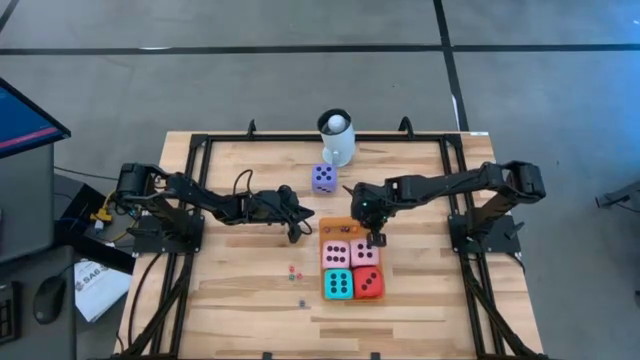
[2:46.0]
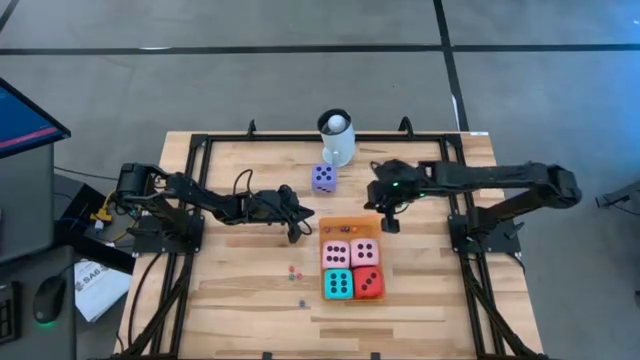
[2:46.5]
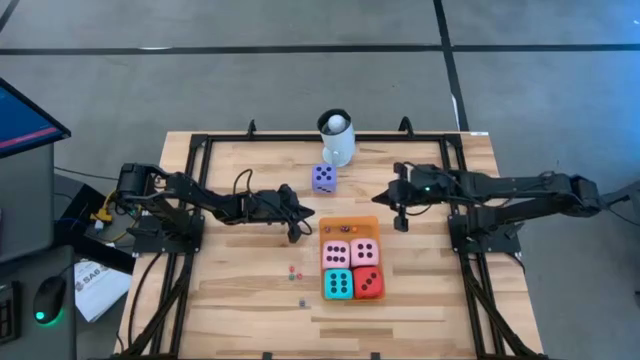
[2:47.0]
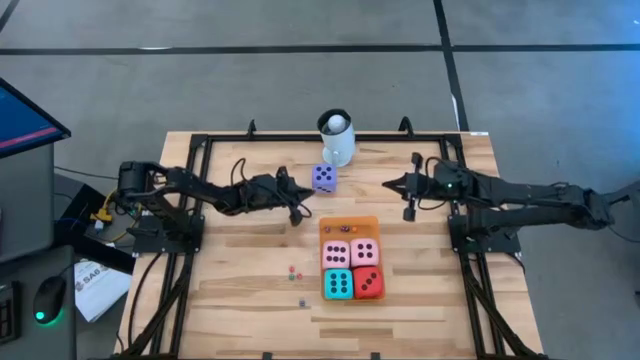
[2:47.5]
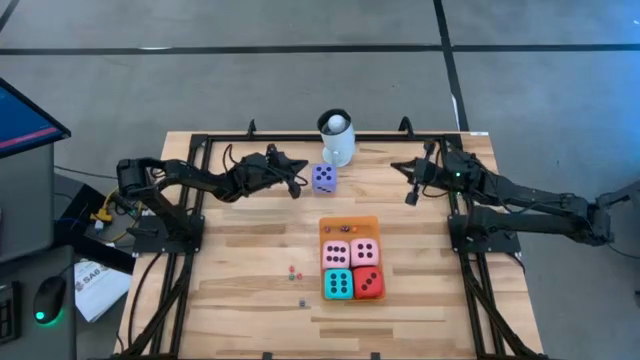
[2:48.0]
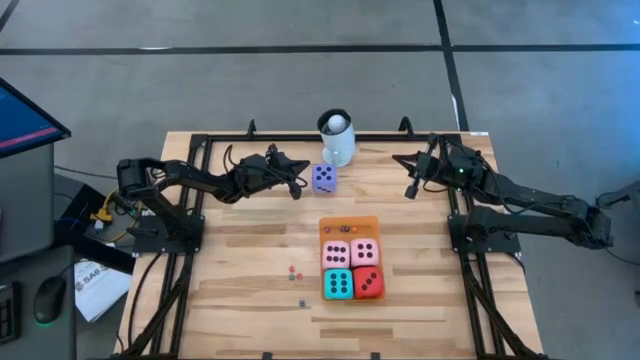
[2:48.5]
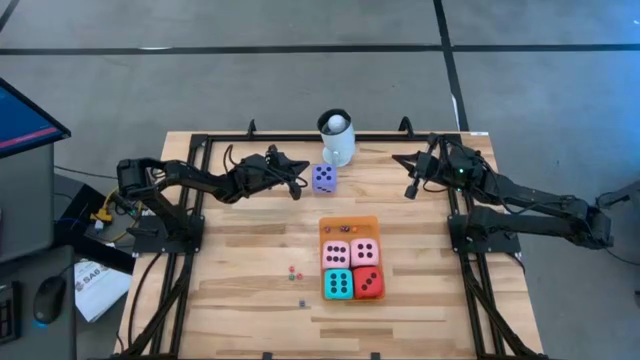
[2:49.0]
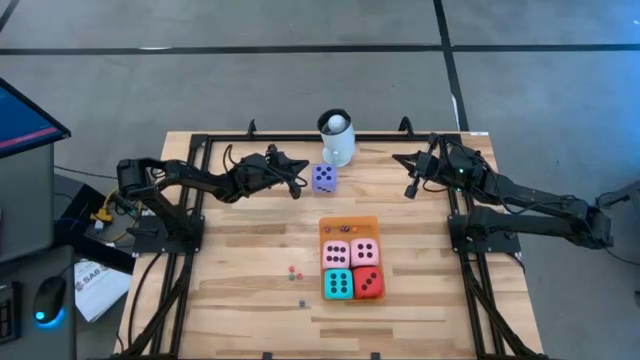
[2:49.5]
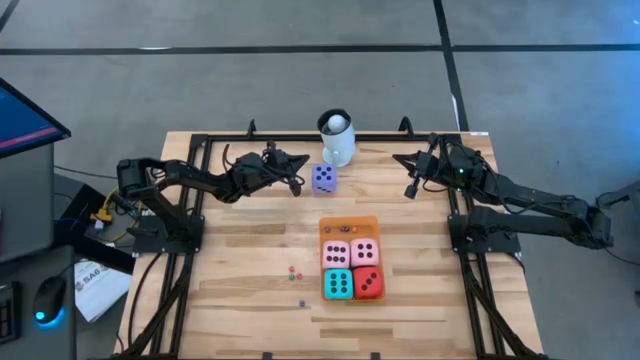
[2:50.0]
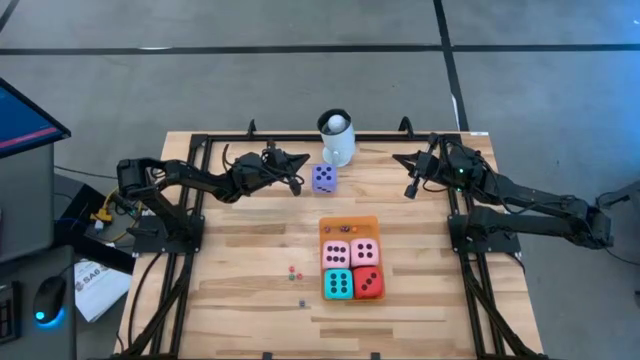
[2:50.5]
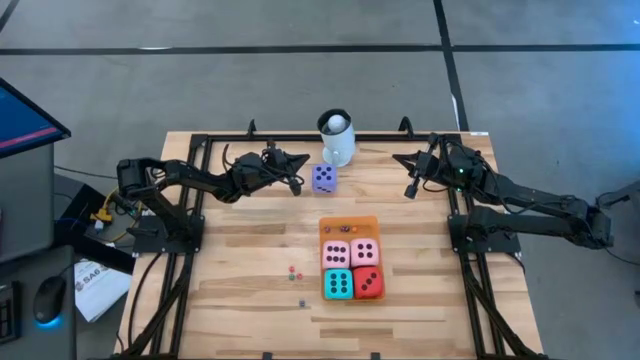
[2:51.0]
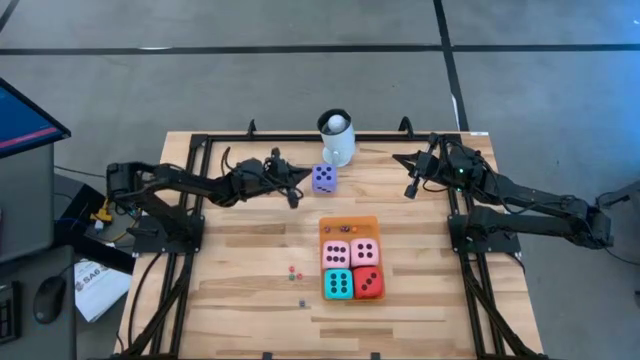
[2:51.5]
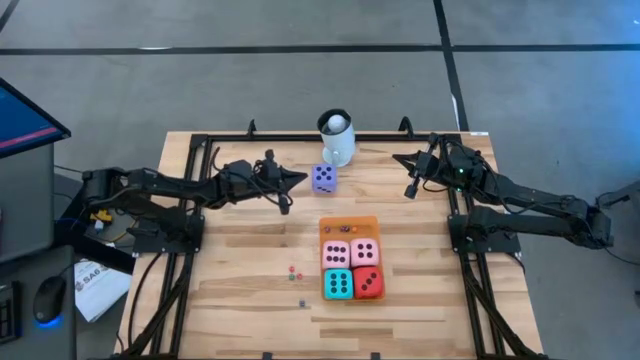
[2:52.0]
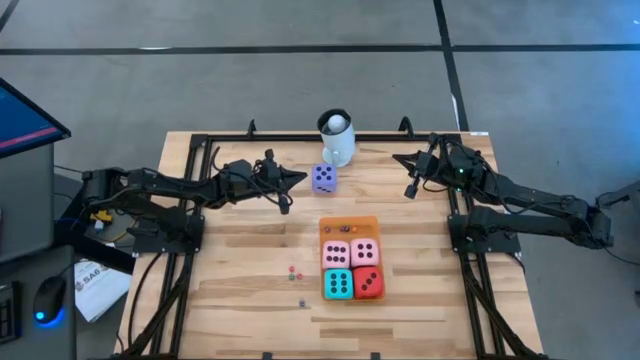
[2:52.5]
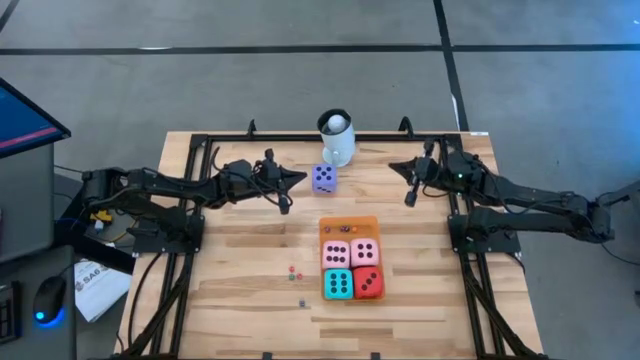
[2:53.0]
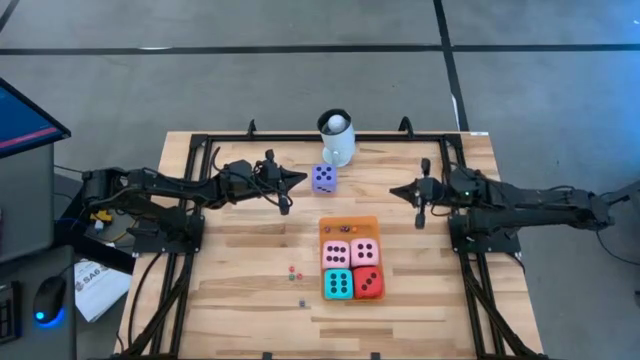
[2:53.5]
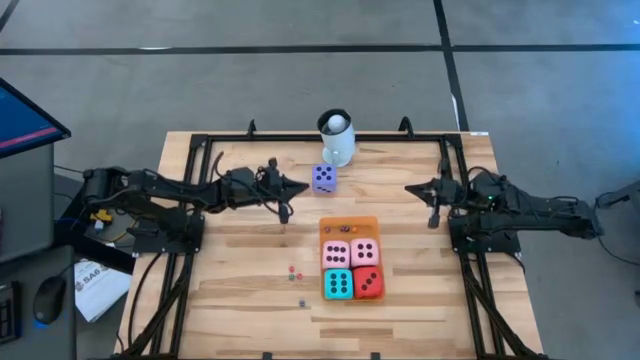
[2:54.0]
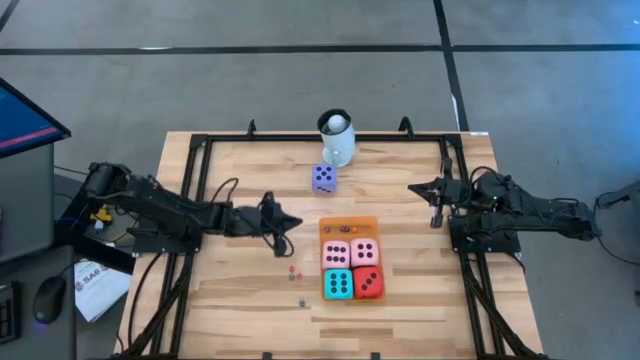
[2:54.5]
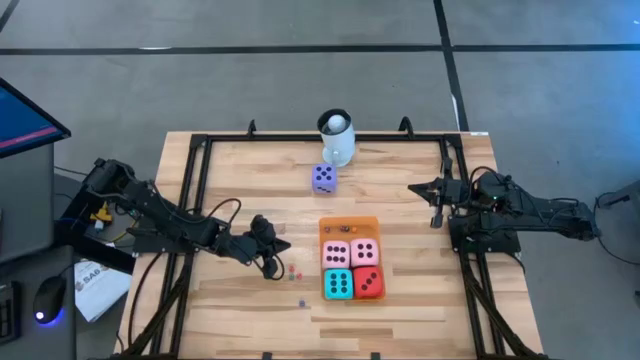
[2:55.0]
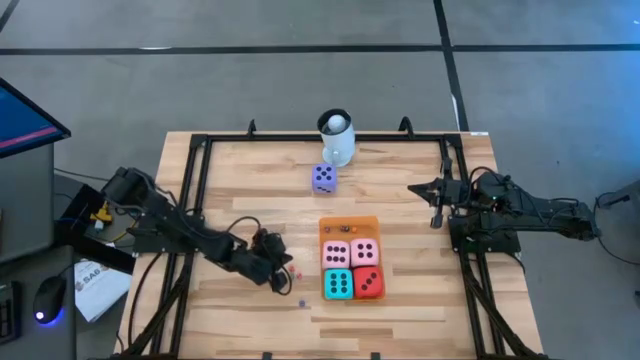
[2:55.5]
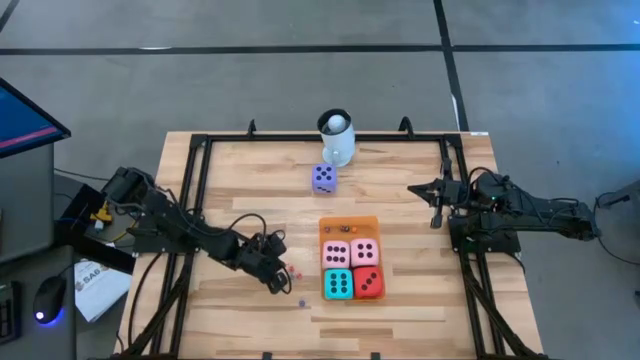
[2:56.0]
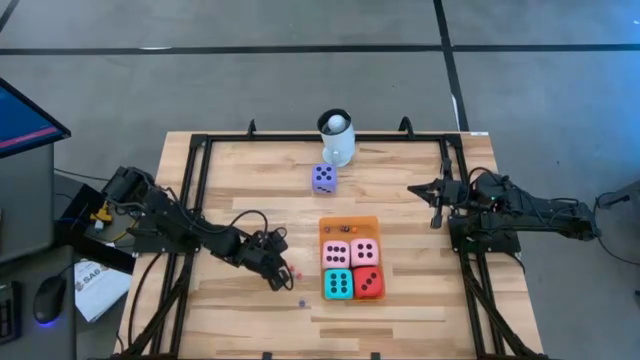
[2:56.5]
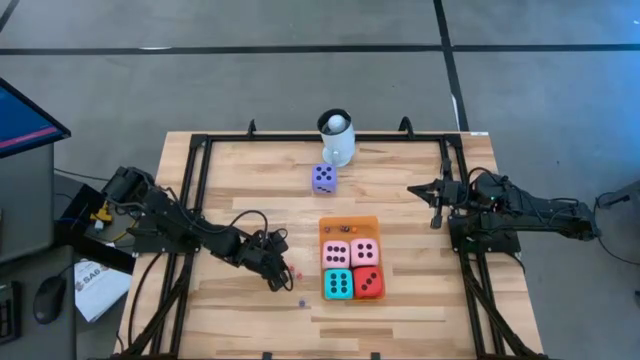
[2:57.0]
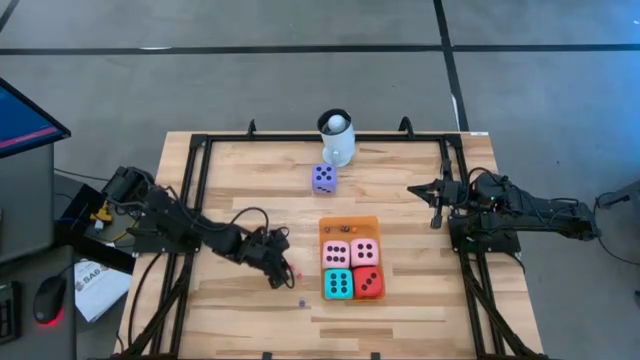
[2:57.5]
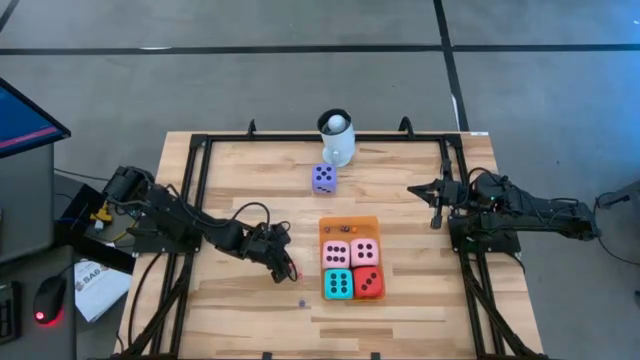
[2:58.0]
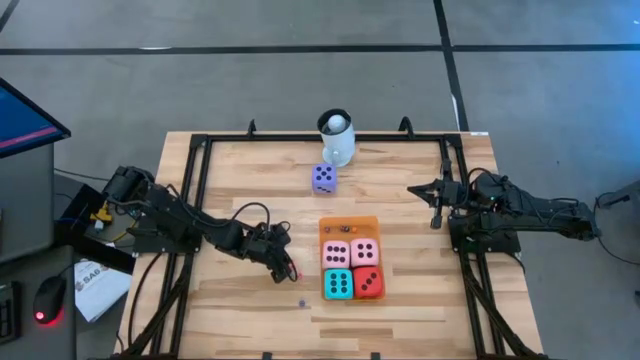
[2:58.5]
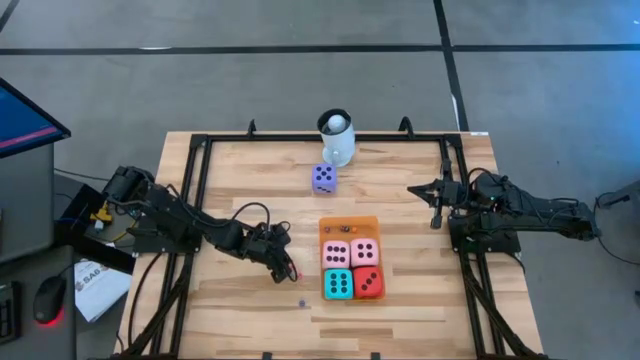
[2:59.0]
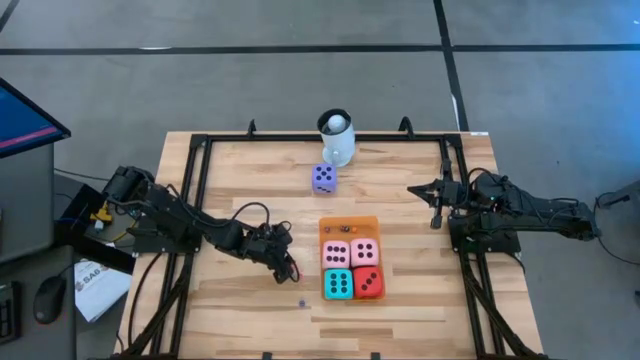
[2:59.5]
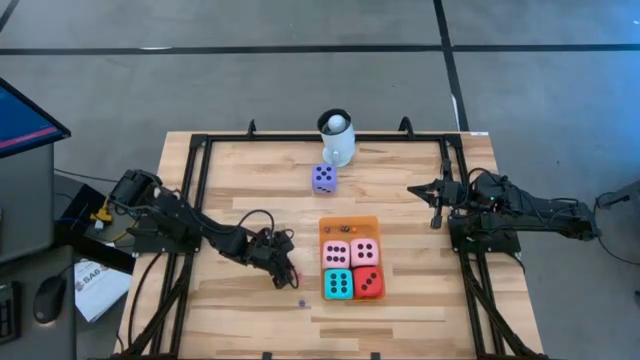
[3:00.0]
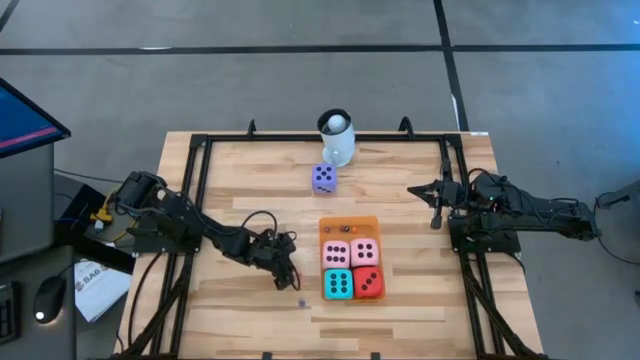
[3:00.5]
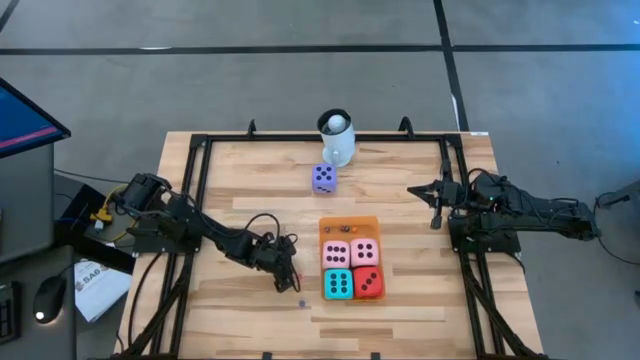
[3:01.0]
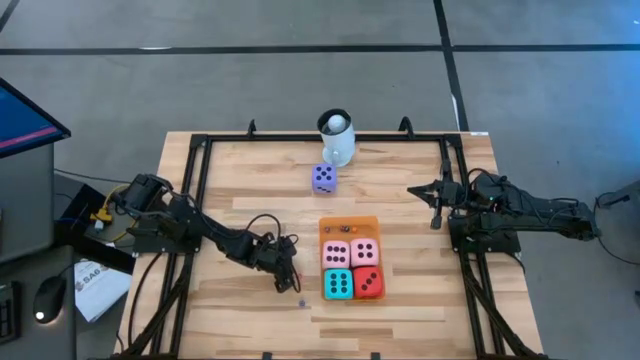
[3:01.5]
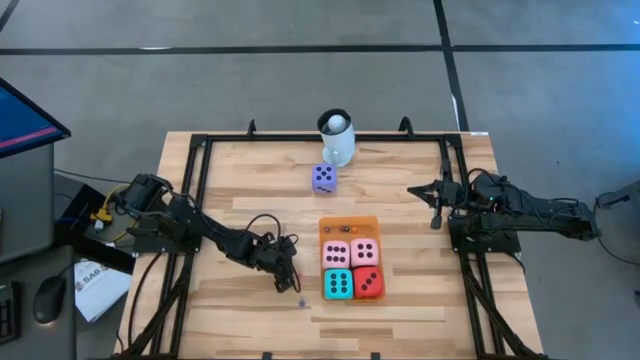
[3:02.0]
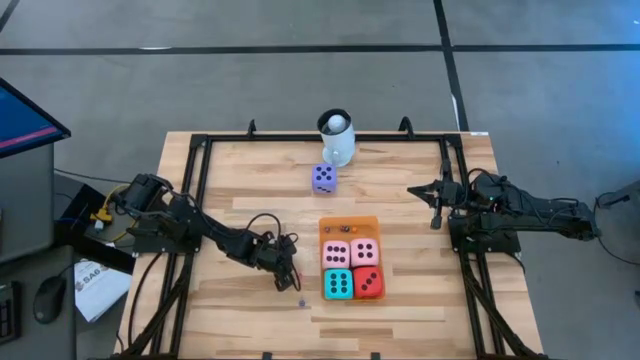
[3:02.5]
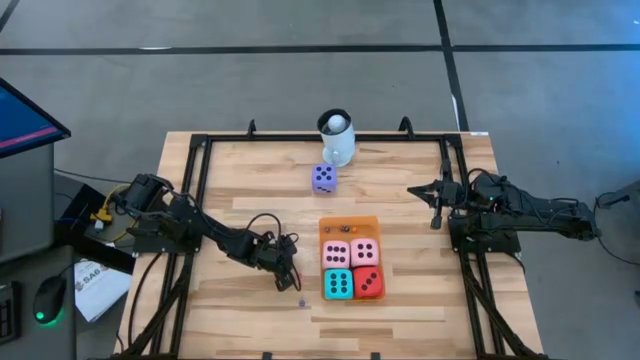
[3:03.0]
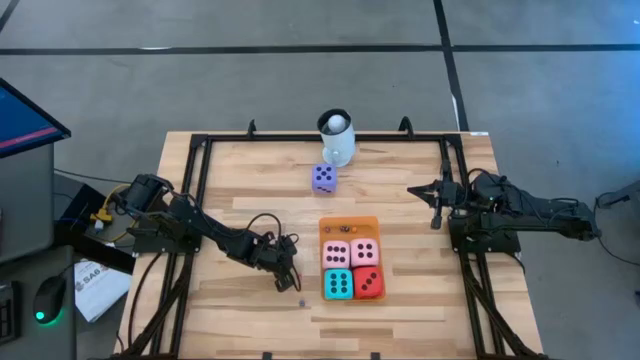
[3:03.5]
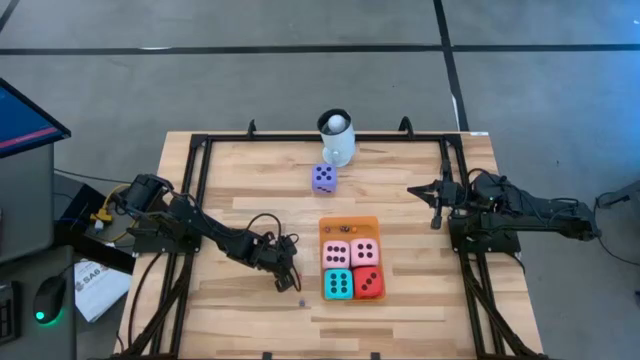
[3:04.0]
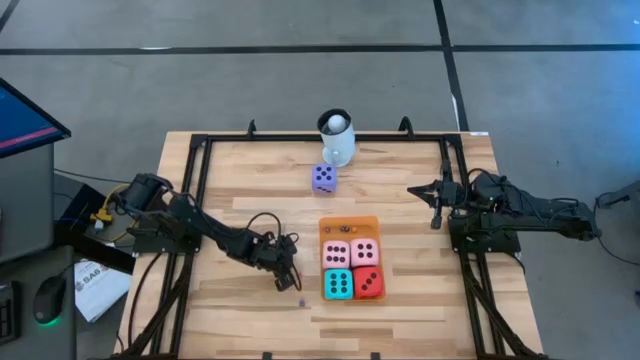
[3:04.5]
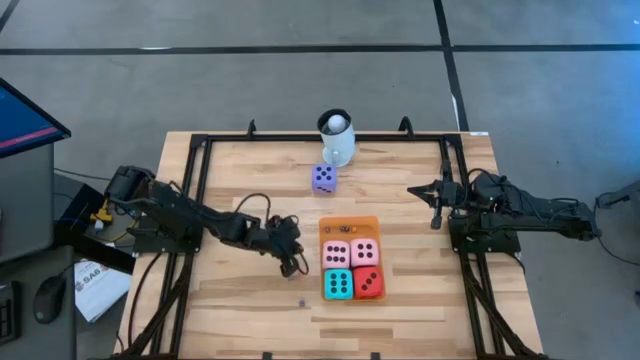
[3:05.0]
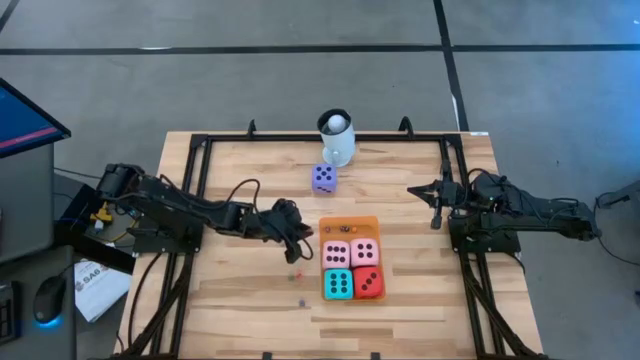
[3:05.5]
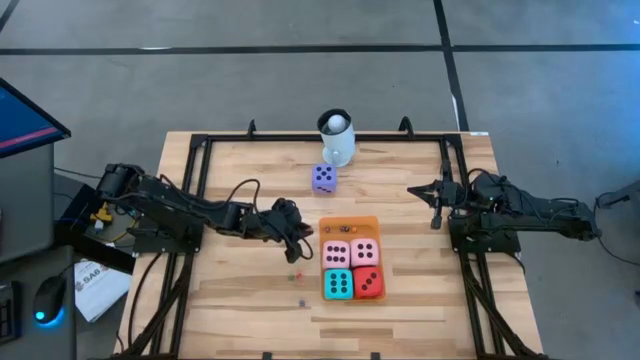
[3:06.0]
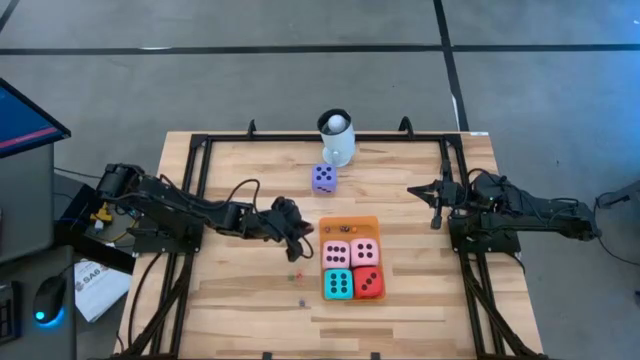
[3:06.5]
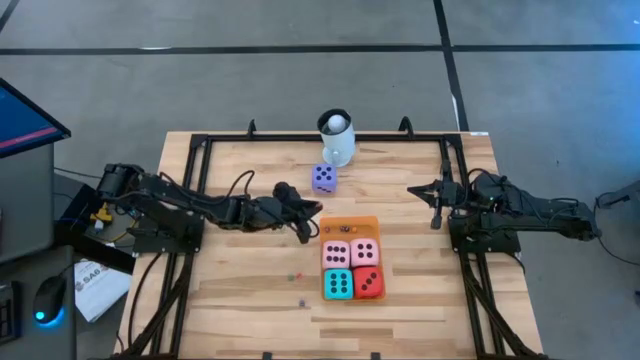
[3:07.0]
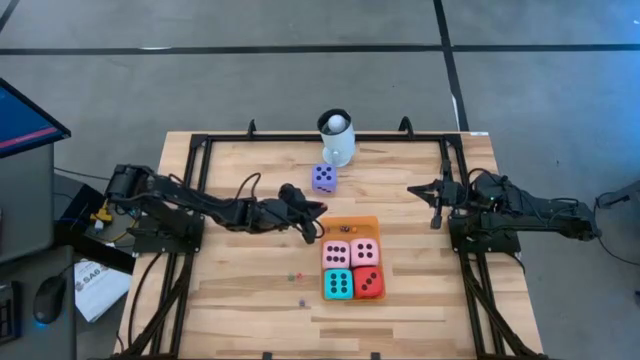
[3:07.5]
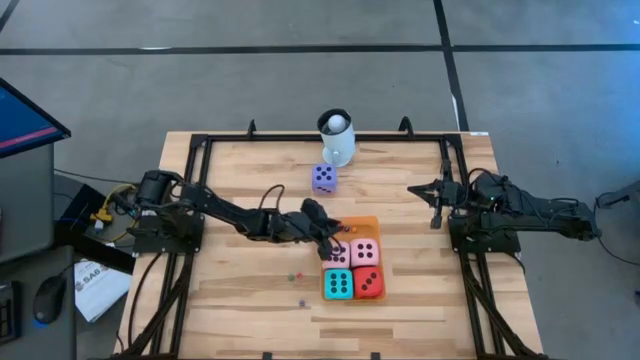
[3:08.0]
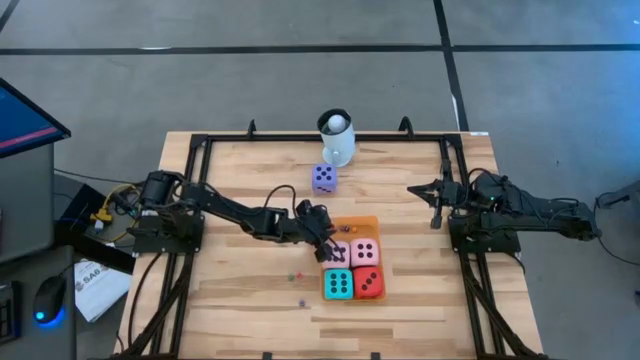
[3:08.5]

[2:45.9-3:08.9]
Task: Pick & Place Dice
Put the left small pink dice into the orange bin
